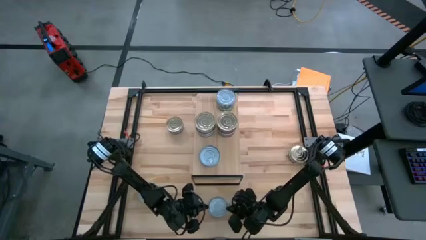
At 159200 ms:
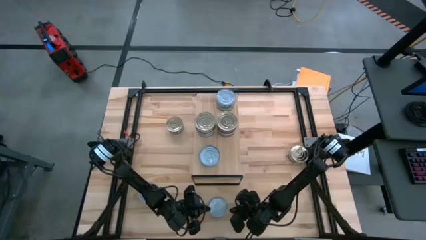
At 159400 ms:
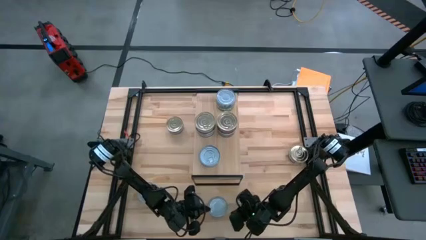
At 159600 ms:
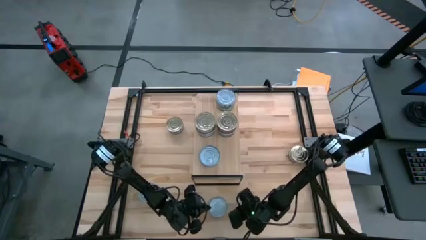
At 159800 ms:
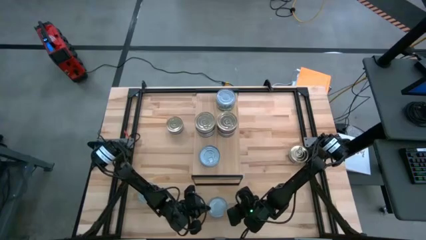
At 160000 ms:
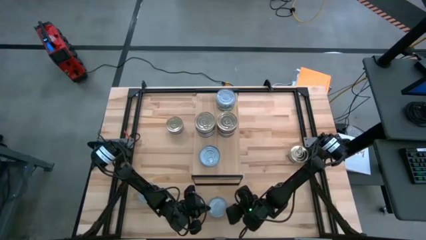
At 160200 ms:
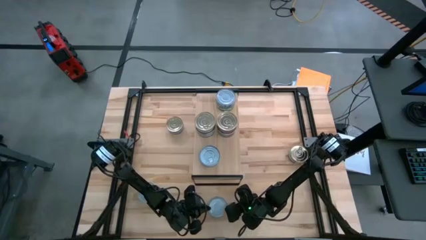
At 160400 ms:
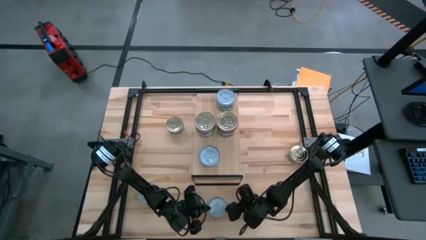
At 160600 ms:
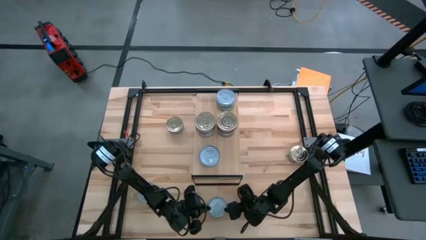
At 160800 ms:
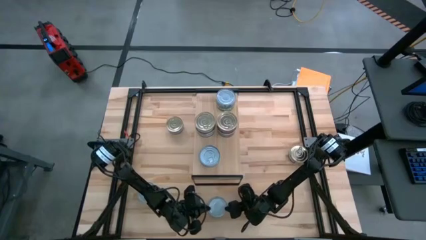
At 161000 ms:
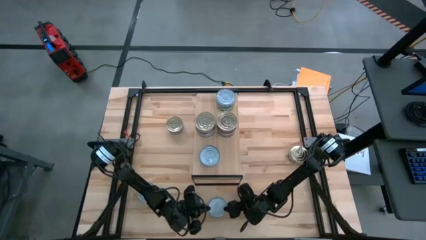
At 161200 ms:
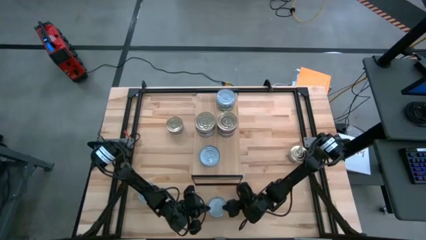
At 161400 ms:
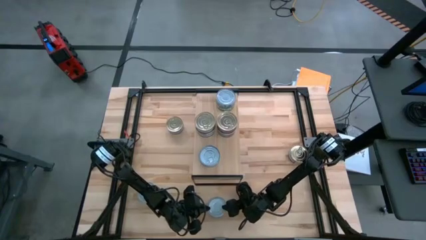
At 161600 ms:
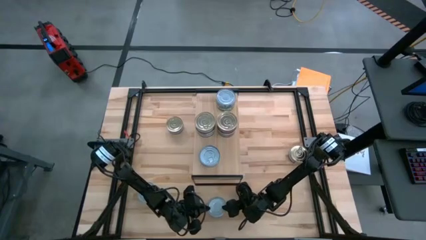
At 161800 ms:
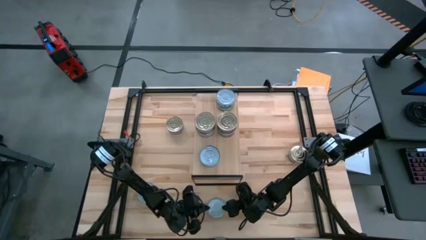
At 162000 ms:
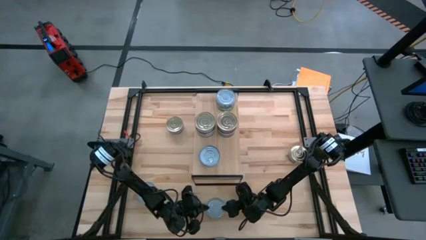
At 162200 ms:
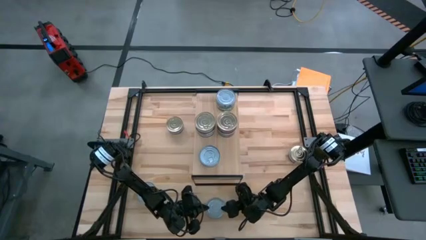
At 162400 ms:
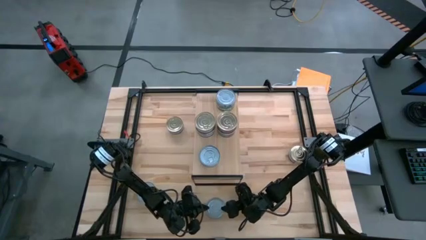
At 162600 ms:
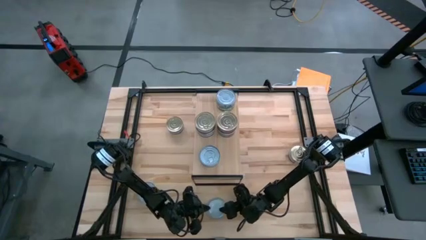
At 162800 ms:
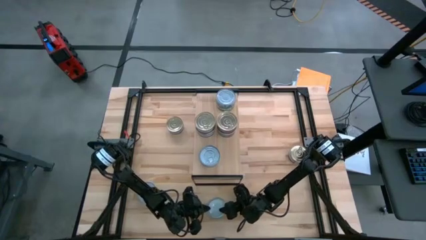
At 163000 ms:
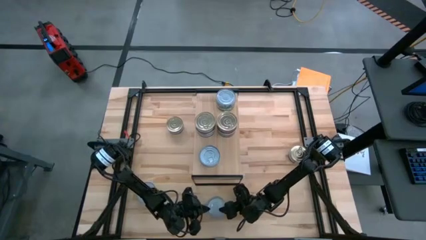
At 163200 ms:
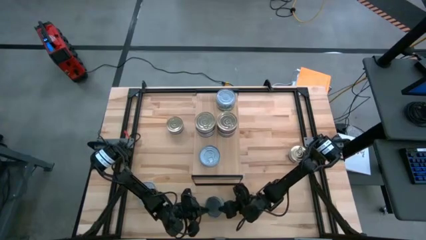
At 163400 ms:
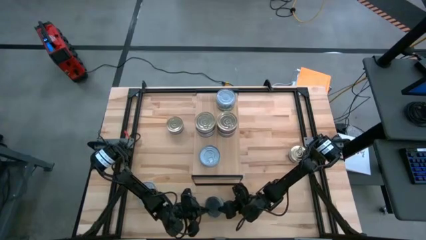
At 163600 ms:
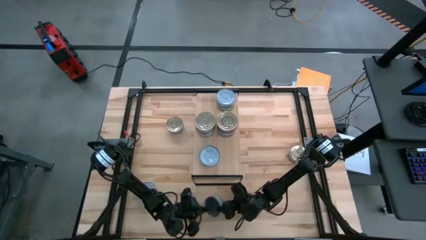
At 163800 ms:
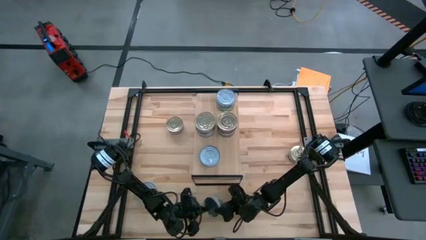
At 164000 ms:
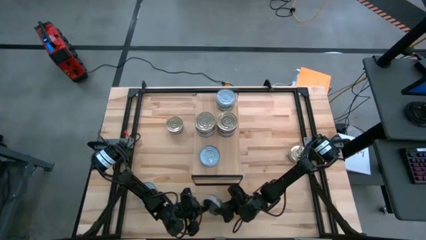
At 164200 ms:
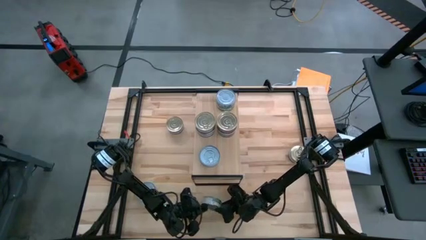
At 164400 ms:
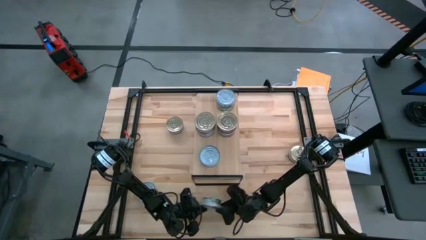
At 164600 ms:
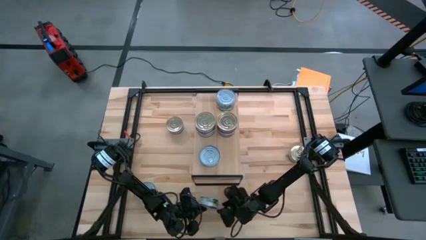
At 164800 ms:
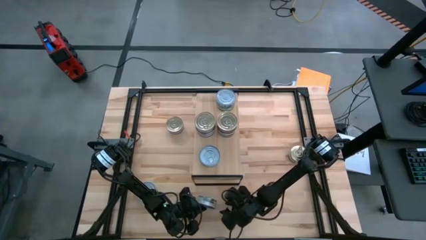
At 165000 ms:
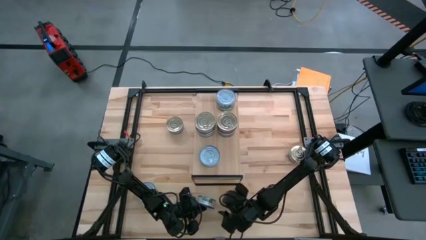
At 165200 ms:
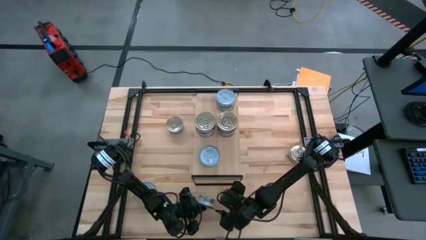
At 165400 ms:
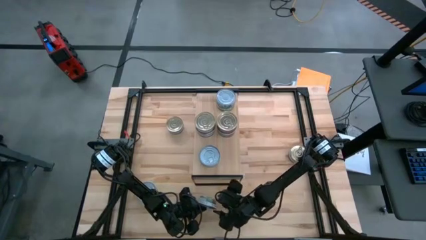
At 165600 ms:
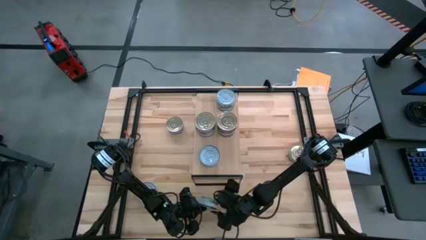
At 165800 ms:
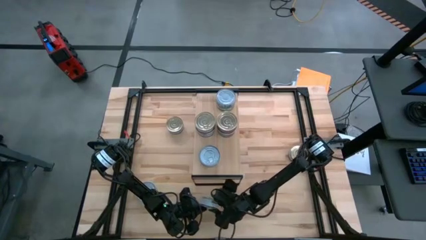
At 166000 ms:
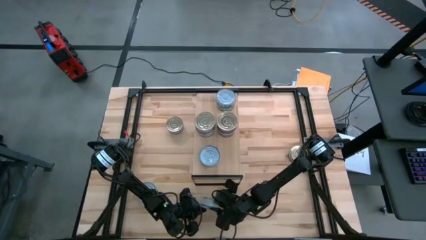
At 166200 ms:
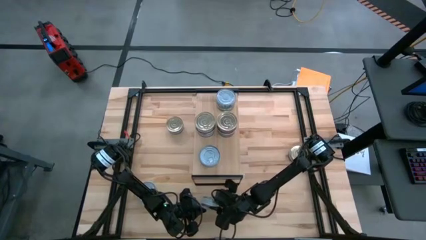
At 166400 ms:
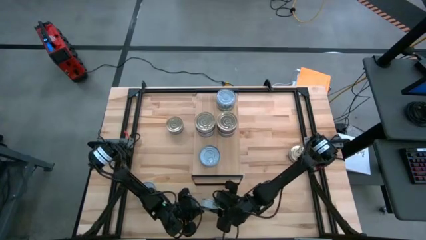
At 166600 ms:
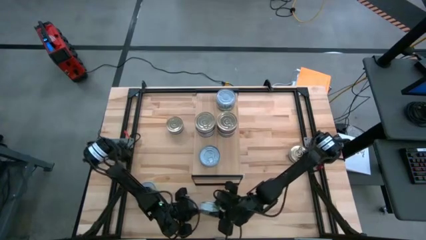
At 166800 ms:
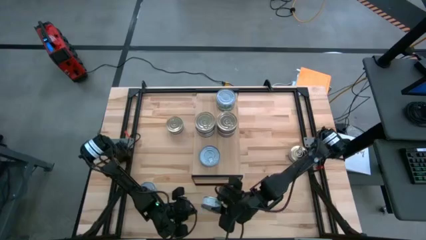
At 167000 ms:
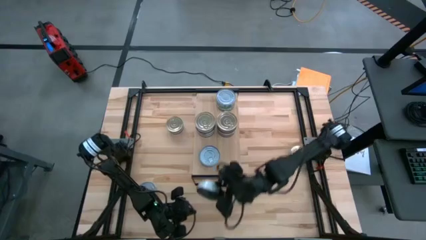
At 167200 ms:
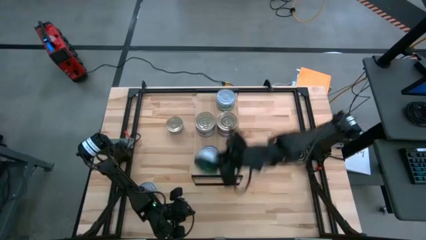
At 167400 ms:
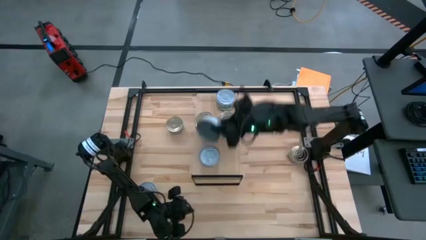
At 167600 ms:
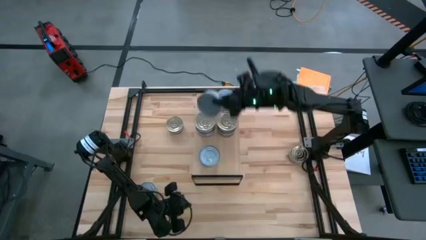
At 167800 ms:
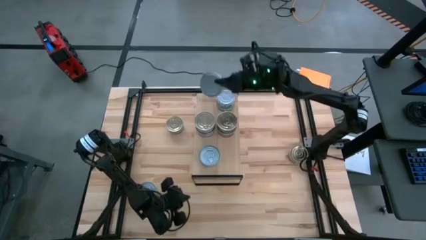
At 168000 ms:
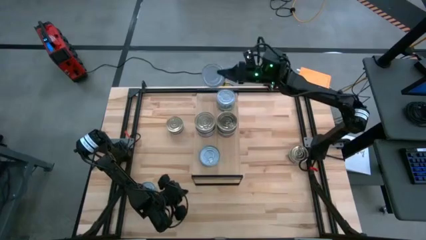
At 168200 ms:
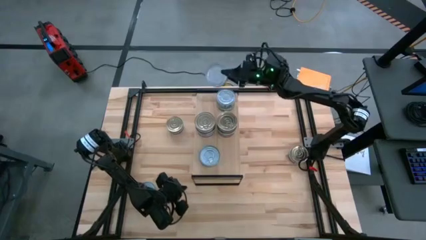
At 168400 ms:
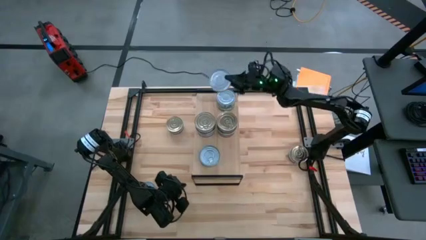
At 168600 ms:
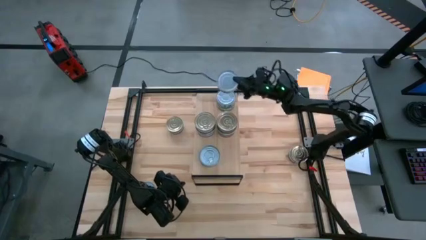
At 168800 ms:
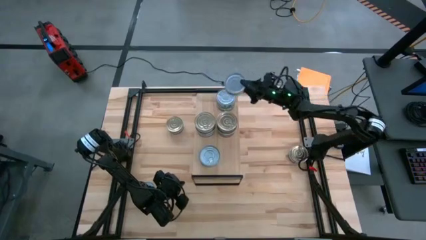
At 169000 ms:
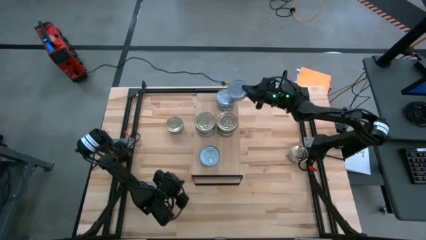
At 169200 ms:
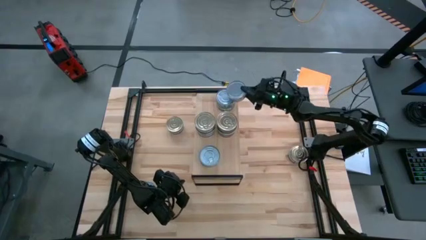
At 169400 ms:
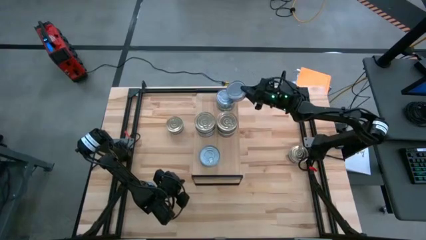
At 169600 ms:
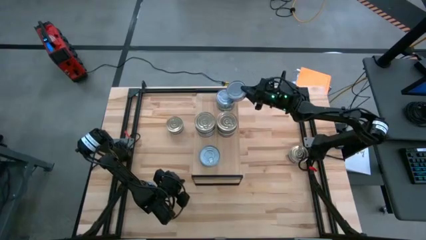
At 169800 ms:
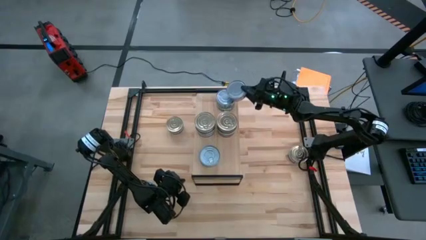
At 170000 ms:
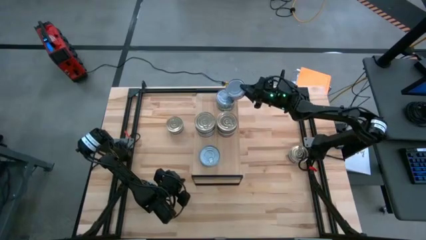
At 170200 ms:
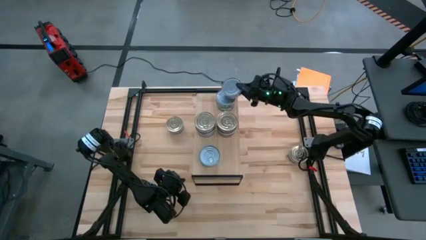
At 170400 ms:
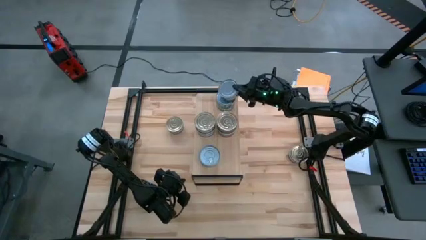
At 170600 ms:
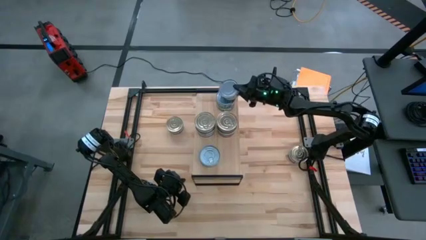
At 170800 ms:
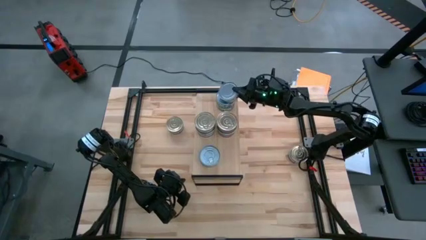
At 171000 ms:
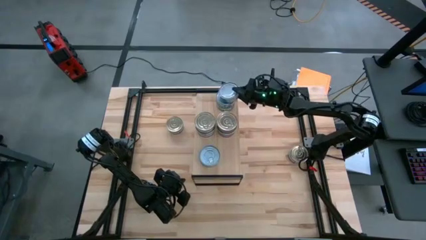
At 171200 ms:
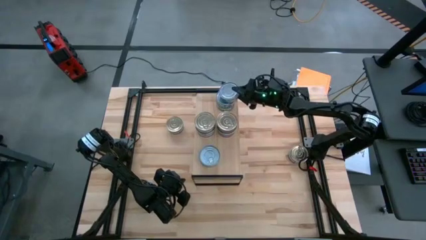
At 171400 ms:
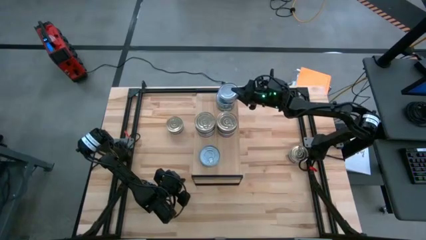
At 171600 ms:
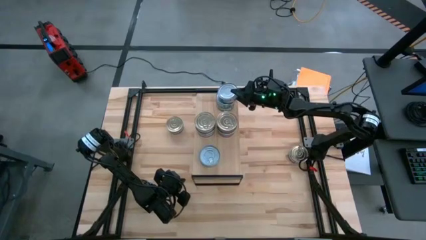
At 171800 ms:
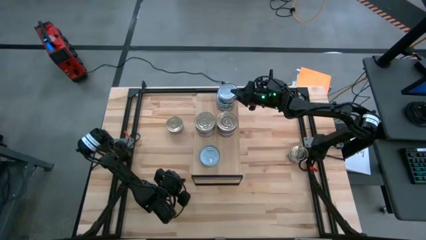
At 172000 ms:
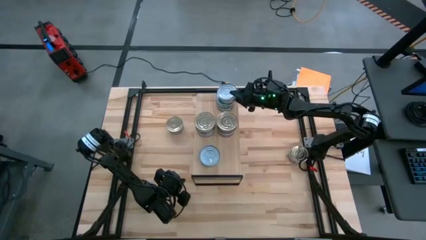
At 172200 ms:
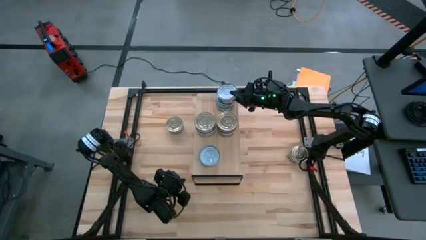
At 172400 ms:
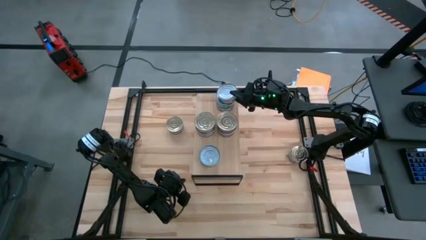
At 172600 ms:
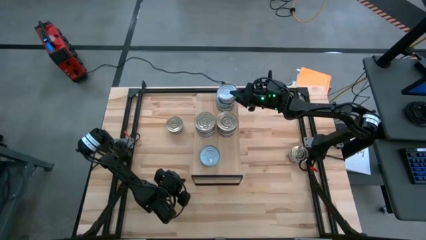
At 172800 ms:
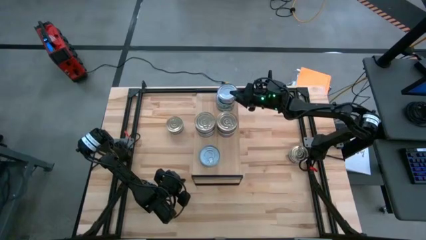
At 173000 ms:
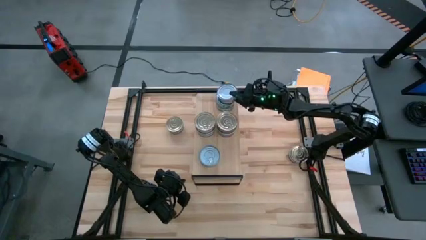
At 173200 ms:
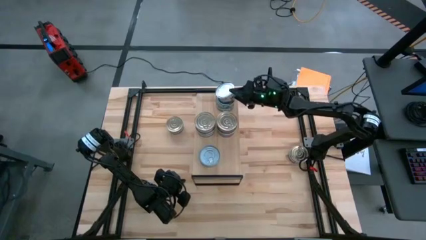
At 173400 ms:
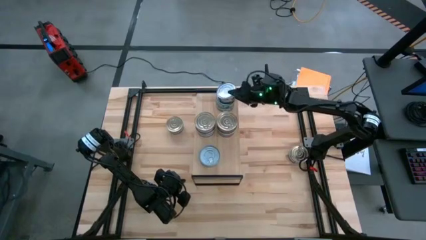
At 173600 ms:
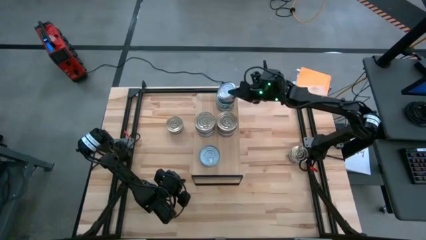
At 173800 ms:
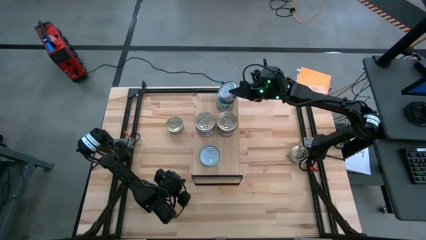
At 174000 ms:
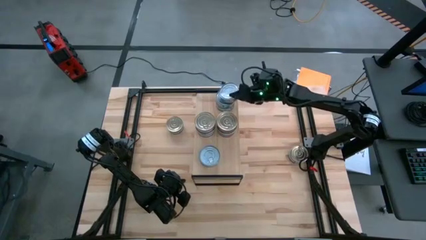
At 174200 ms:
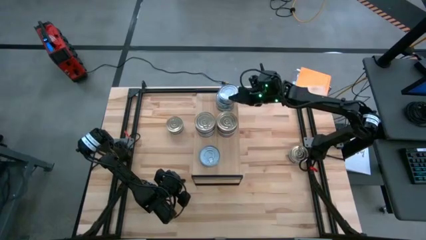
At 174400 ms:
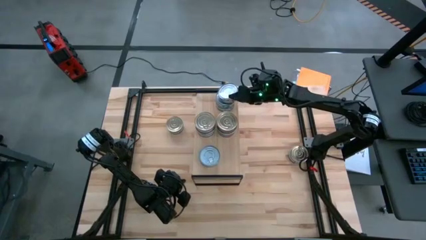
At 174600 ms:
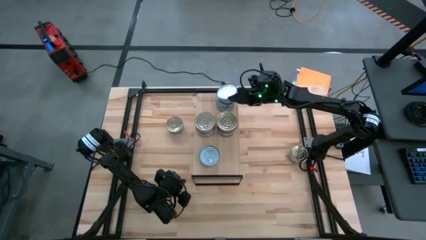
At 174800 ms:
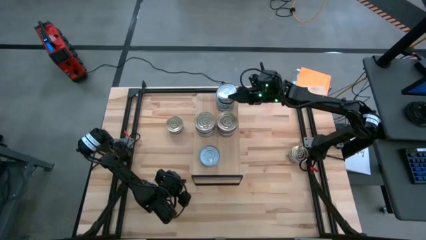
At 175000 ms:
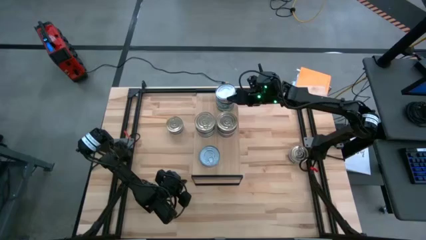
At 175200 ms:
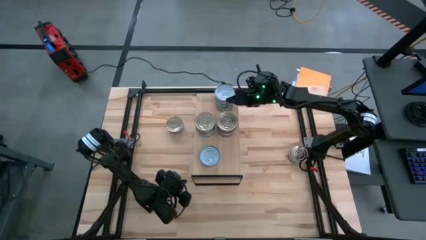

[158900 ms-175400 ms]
Task: Stack canned seafood by type on shelf
Stack the green tuna can on top of the green tuna can on the shelf
